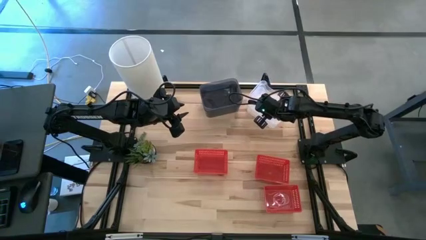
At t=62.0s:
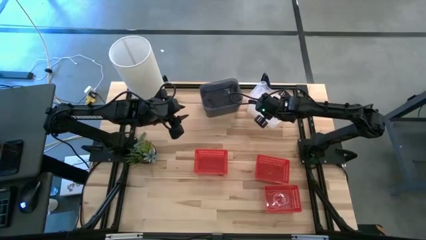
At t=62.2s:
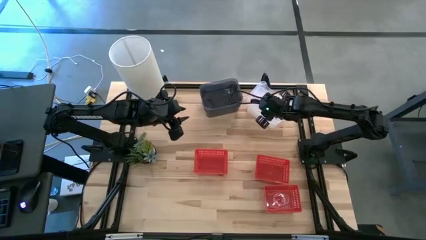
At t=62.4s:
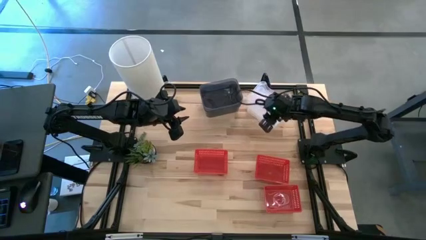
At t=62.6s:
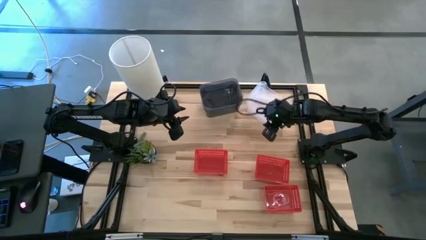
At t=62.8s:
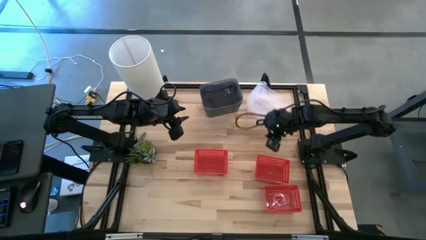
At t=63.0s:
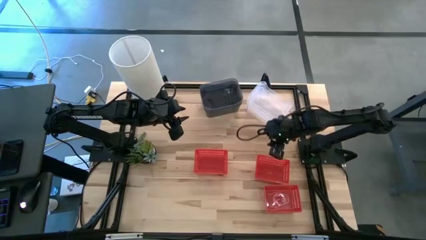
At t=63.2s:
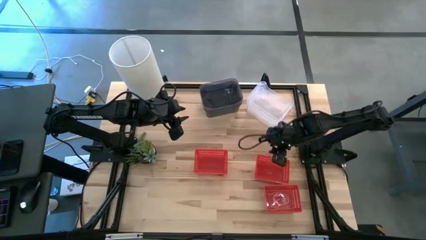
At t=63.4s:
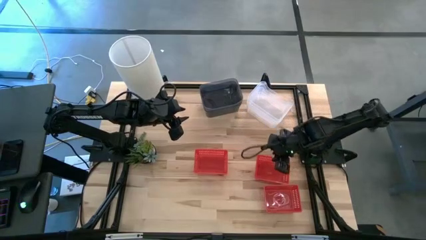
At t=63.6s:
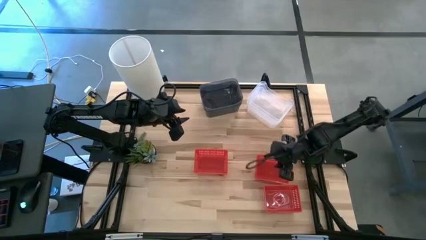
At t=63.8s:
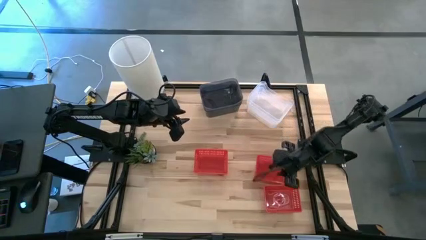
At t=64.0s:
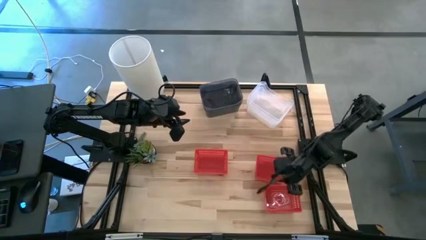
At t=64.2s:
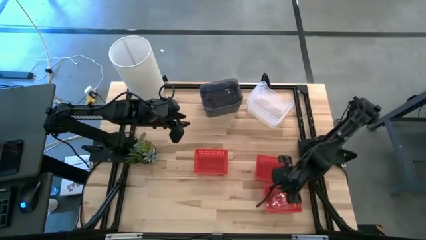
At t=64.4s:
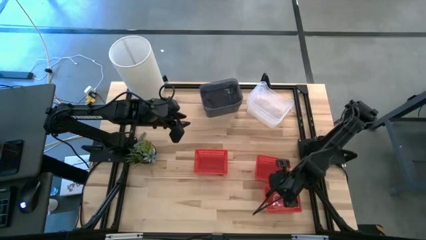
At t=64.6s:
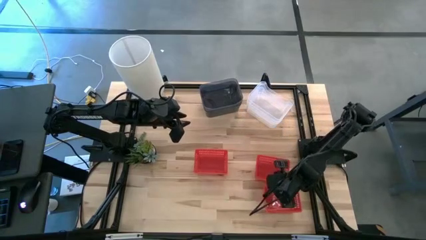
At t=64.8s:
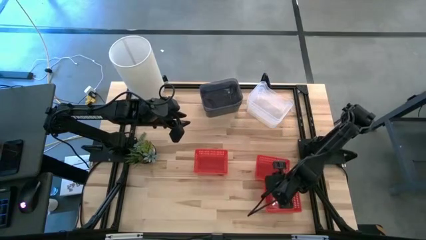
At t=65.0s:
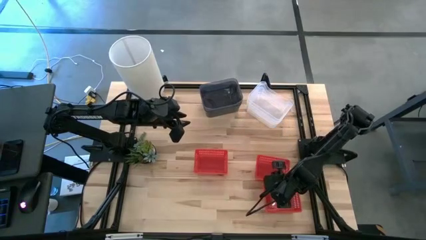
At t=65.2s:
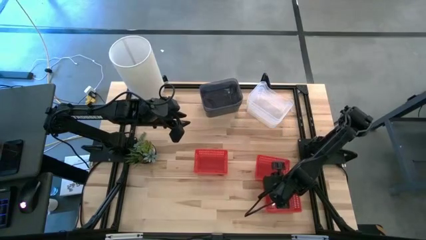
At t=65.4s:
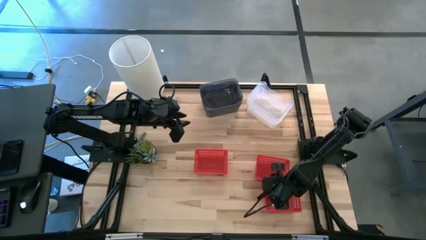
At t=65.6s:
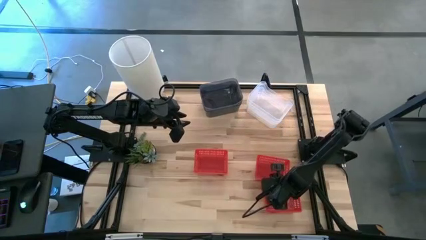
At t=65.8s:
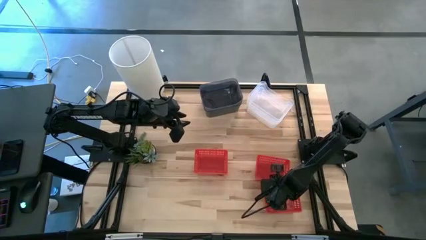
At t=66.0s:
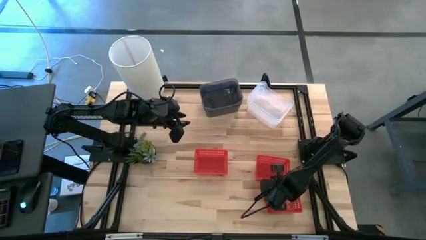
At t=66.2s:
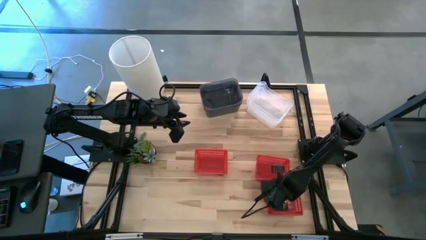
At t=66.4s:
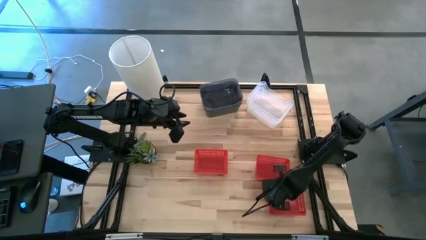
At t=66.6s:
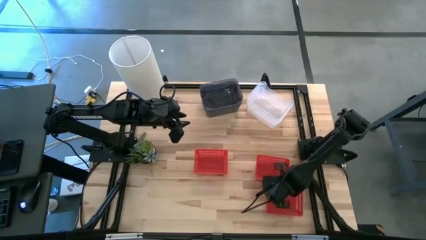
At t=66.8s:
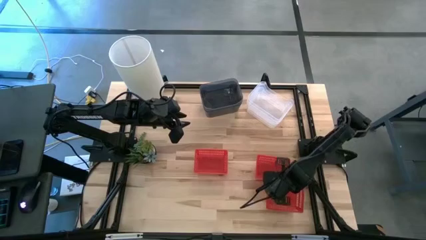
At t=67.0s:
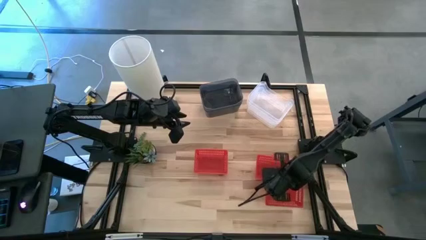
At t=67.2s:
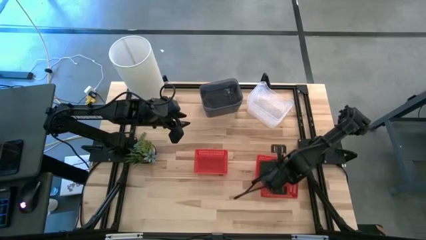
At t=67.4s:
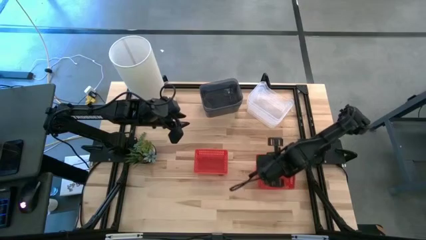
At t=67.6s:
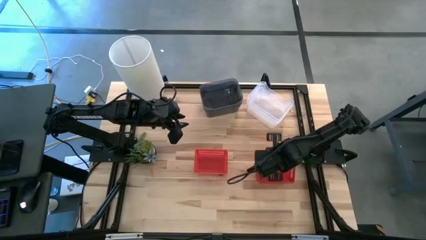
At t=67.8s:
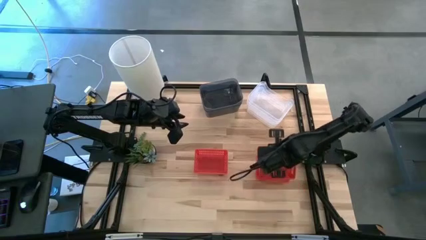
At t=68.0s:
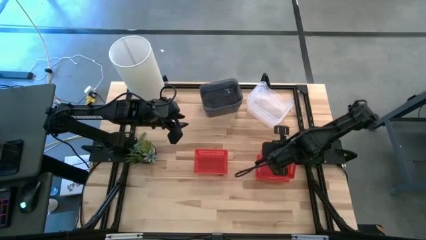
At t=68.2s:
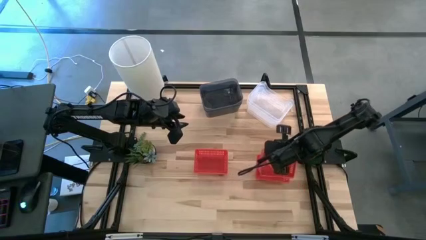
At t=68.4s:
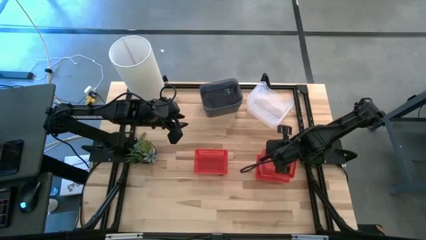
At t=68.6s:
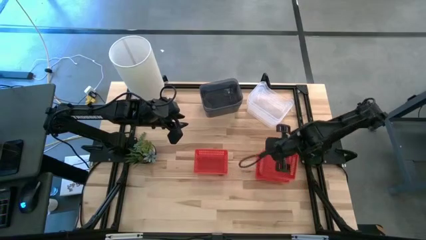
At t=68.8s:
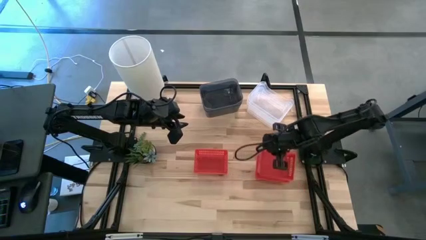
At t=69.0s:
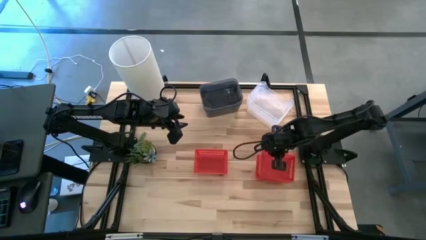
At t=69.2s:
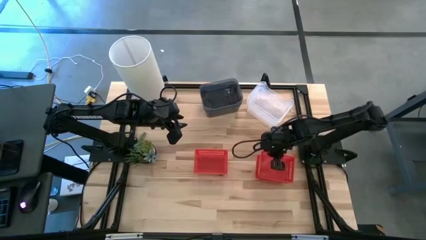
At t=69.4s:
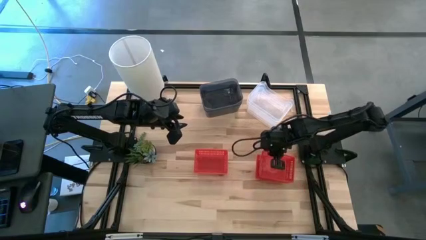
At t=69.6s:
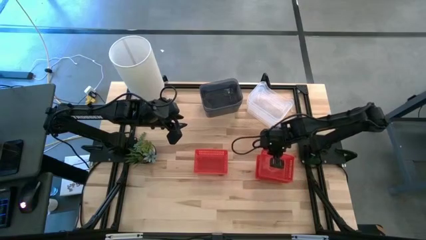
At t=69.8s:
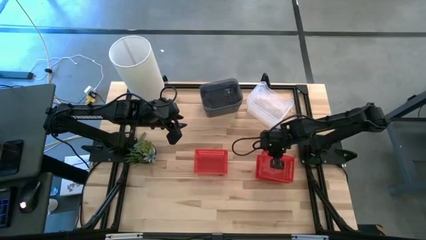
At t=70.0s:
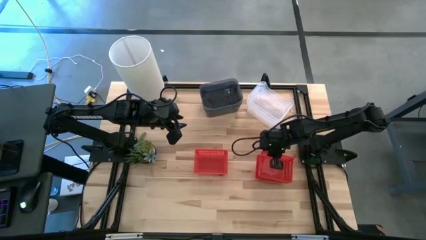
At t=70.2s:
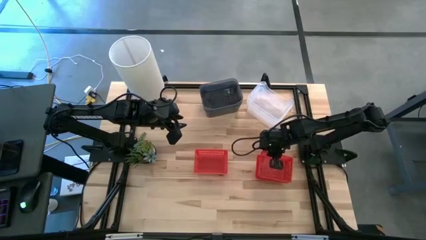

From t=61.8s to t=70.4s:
Stack the bottom red bin on the top right red bin

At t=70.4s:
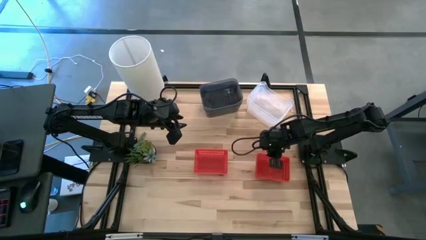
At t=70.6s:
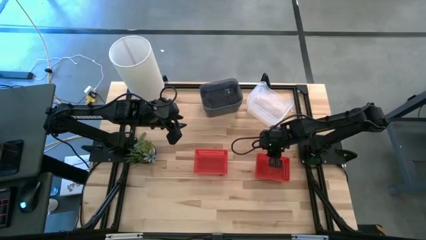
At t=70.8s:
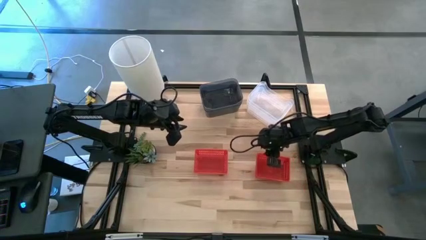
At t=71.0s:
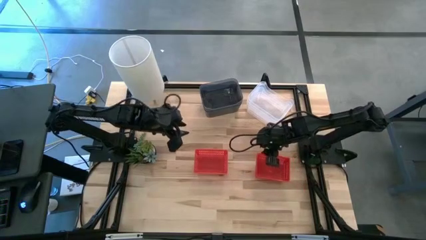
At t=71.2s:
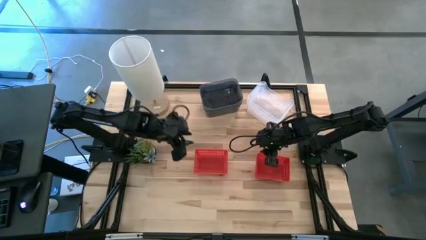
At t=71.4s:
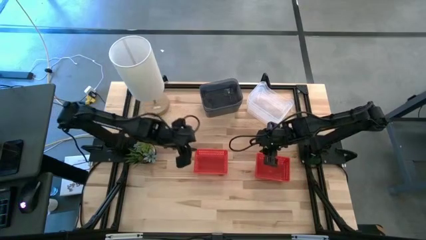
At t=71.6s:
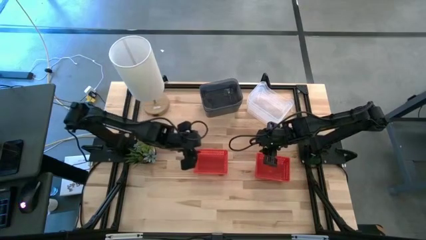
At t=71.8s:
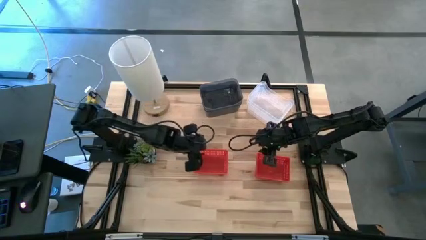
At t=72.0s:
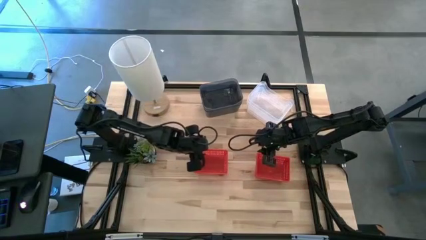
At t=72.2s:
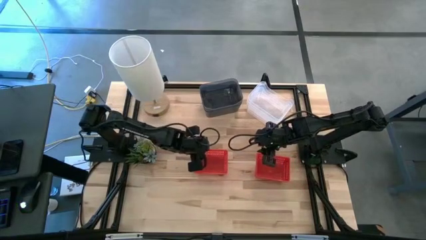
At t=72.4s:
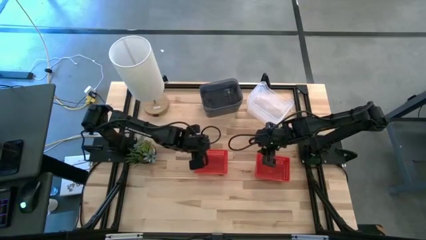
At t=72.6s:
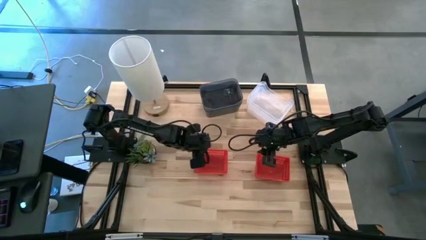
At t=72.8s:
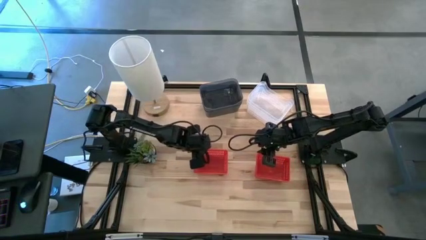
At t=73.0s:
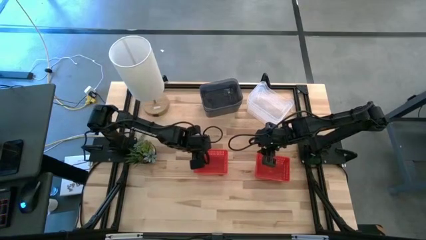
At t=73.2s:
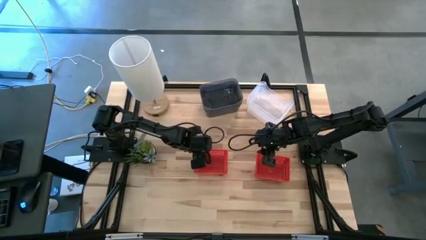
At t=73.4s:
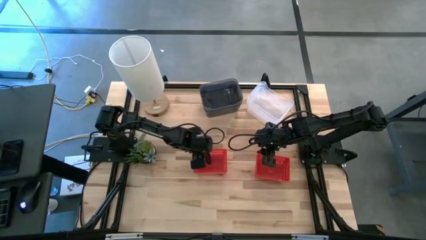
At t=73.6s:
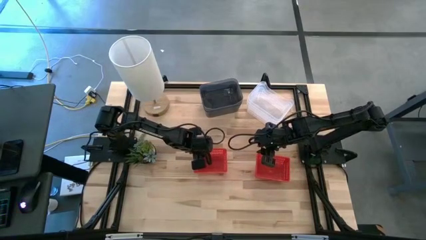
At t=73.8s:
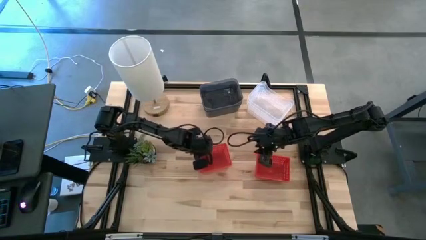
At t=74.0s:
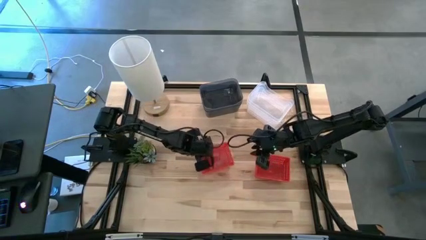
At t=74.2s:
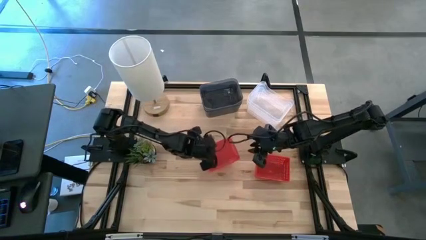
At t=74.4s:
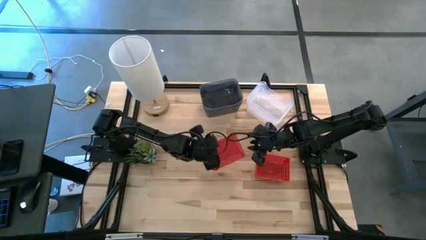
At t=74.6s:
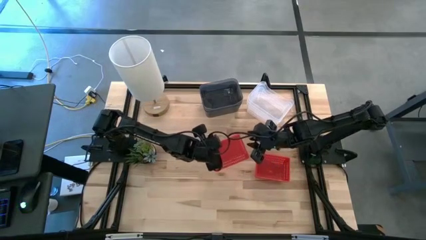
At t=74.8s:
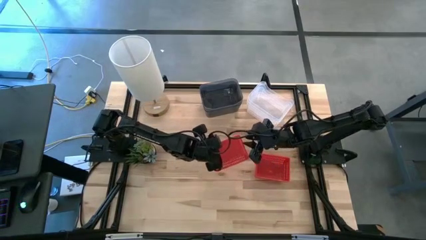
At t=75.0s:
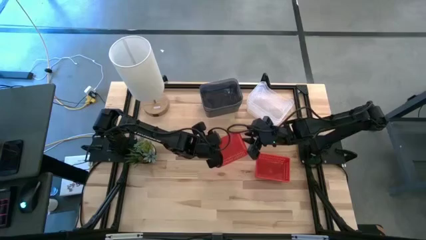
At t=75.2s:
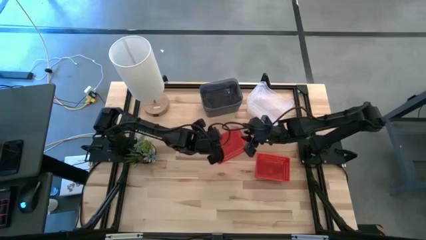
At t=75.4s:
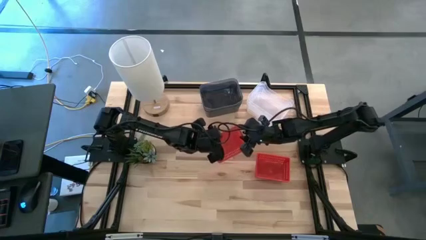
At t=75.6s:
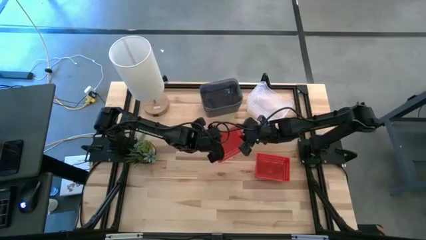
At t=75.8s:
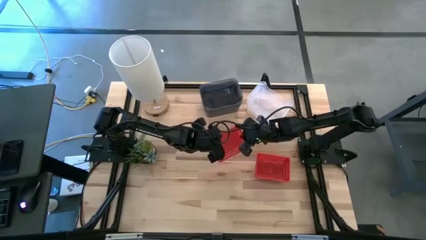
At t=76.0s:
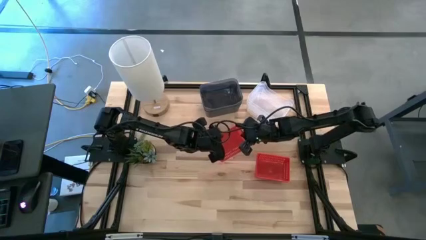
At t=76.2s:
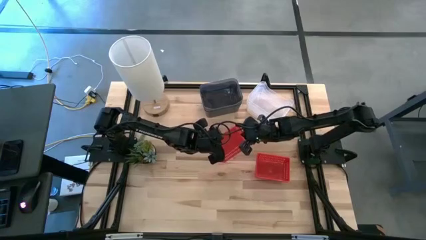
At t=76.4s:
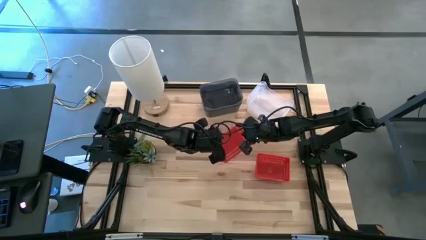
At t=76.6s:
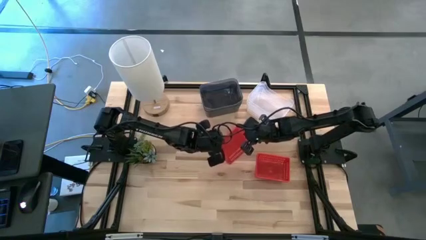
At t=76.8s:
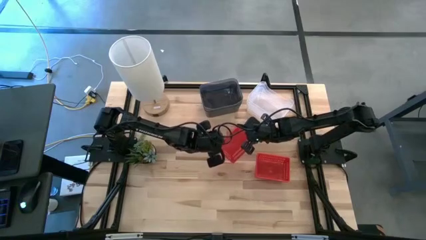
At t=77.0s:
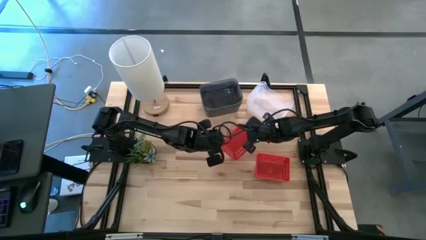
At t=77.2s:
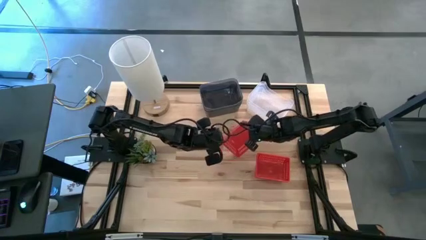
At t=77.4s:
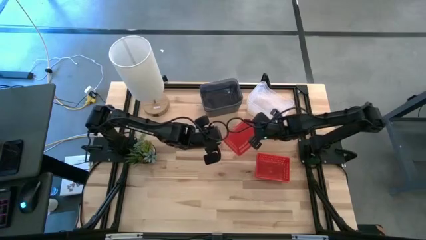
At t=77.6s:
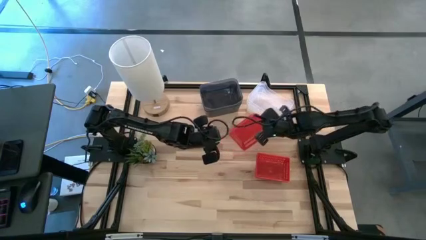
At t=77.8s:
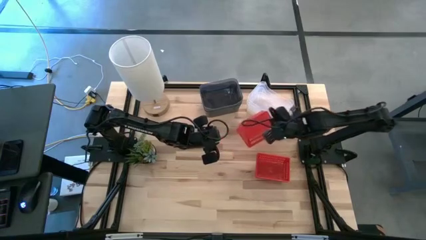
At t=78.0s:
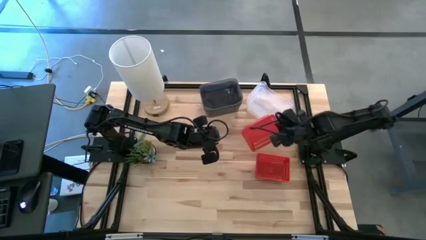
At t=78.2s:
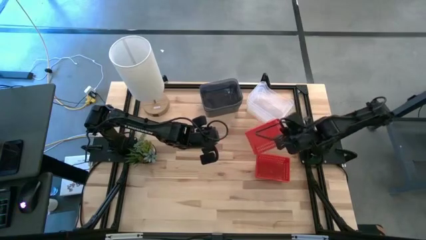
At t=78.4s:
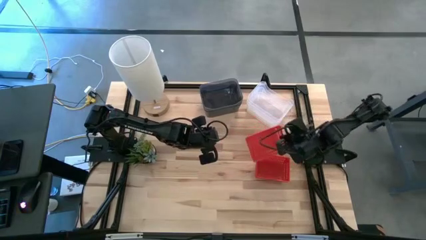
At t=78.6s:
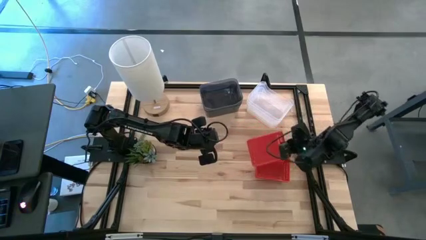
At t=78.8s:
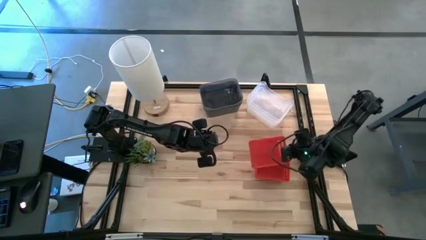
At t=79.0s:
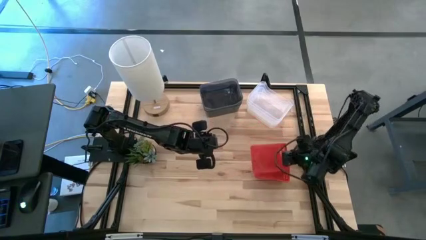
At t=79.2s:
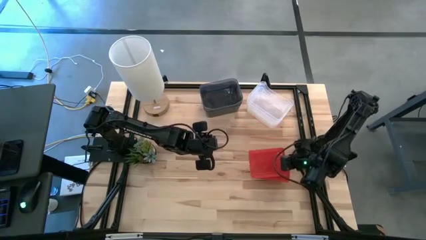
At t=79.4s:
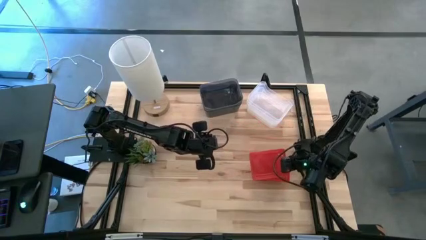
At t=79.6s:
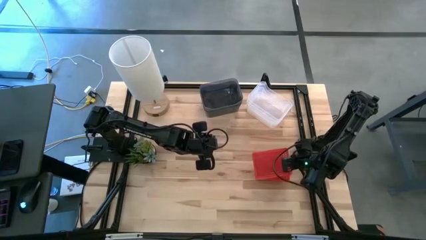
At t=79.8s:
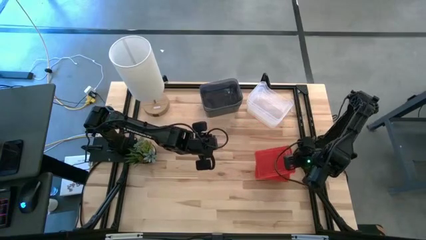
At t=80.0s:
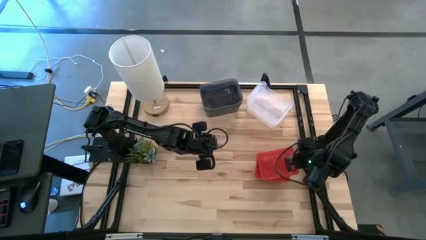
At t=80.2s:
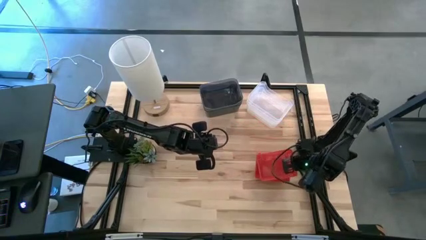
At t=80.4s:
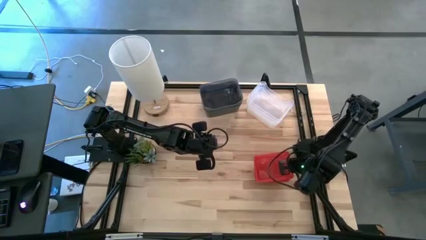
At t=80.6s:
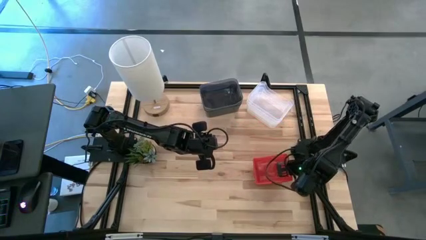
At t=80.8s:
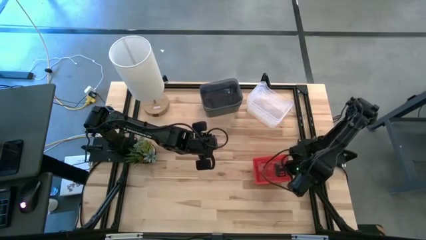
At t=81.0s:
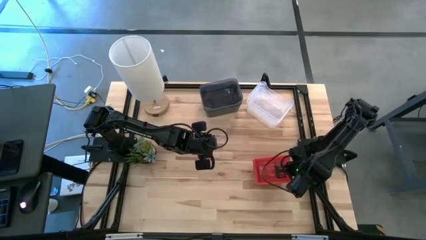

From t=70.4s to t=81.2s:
Stack the left red bin on the stacked red bins
